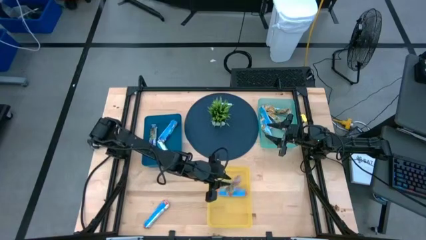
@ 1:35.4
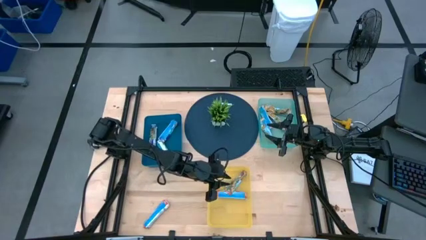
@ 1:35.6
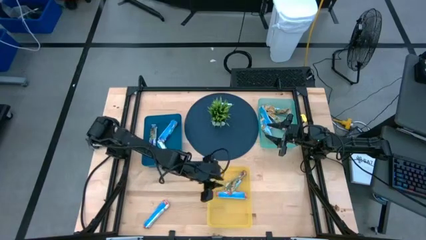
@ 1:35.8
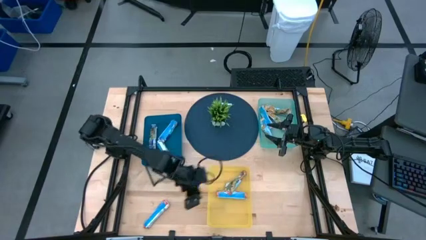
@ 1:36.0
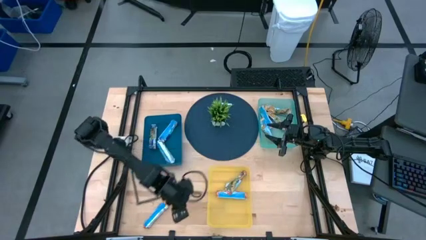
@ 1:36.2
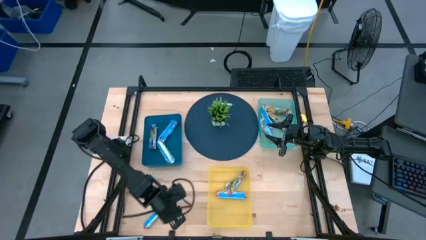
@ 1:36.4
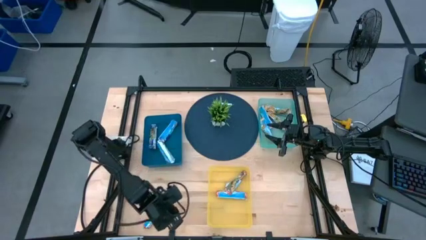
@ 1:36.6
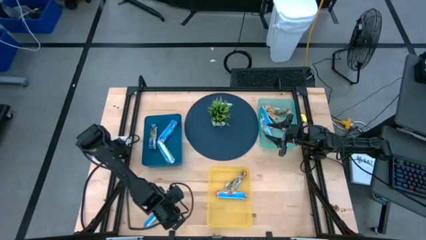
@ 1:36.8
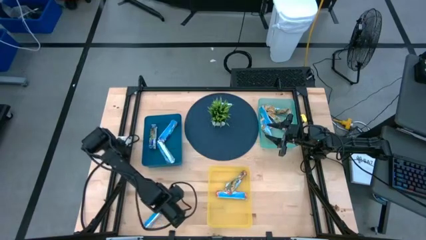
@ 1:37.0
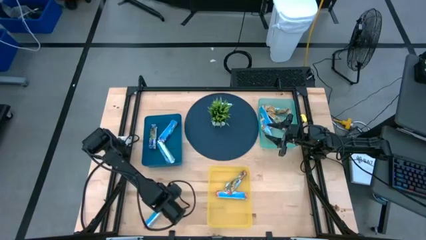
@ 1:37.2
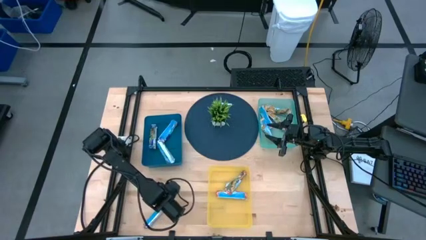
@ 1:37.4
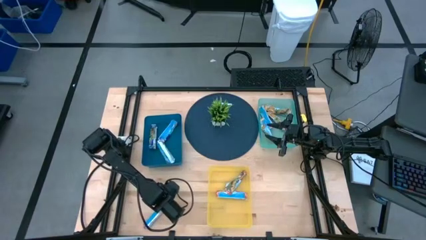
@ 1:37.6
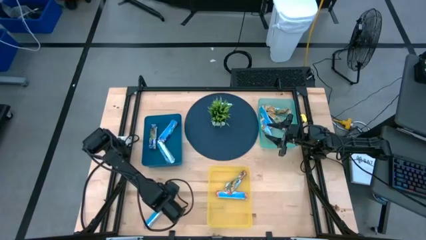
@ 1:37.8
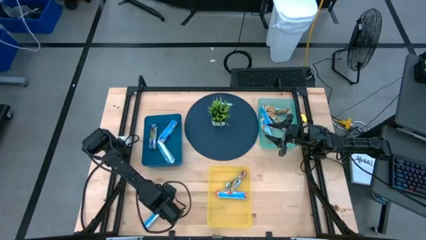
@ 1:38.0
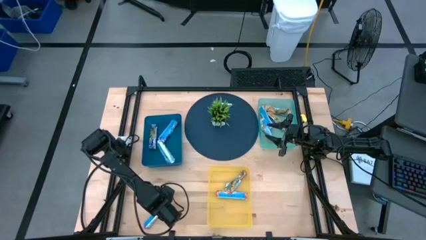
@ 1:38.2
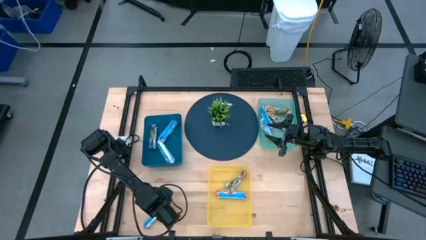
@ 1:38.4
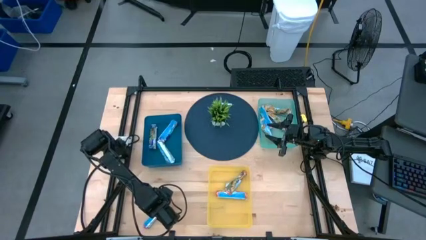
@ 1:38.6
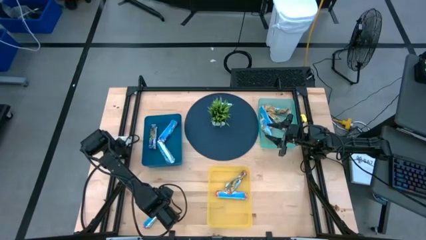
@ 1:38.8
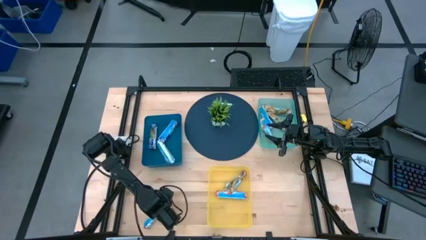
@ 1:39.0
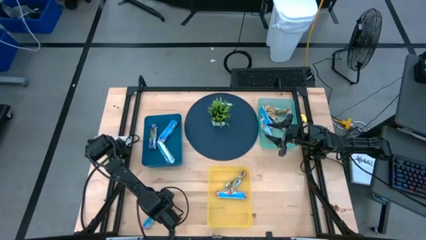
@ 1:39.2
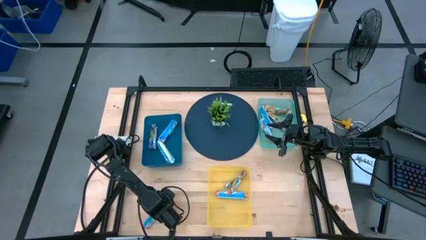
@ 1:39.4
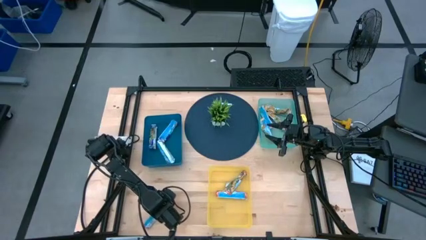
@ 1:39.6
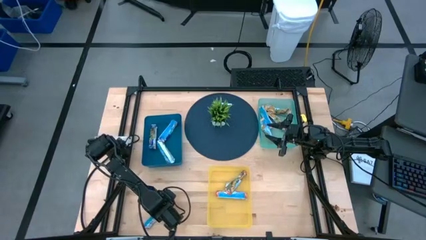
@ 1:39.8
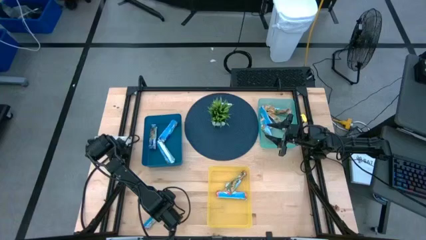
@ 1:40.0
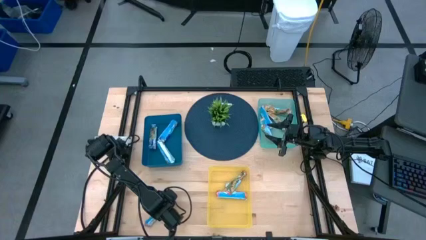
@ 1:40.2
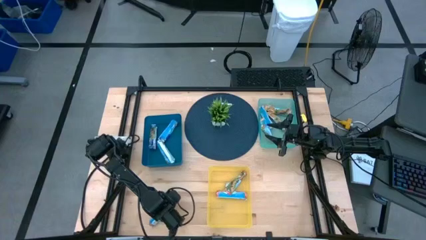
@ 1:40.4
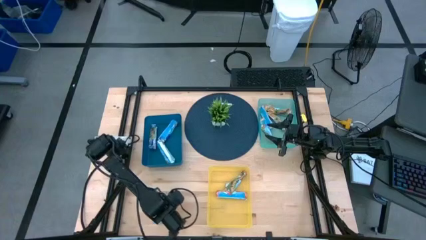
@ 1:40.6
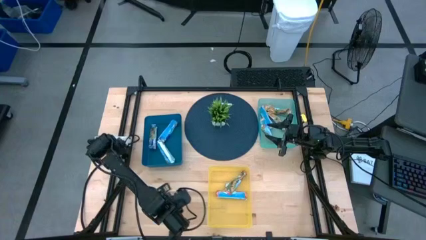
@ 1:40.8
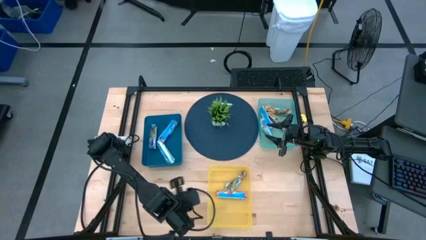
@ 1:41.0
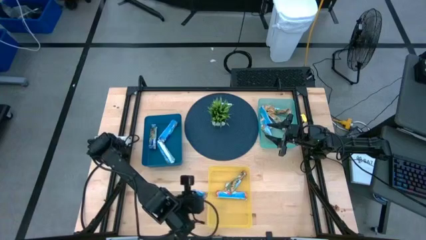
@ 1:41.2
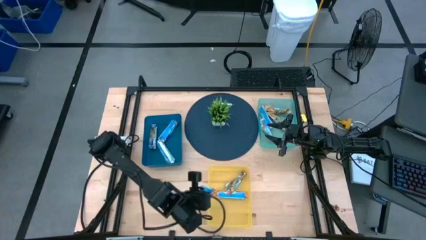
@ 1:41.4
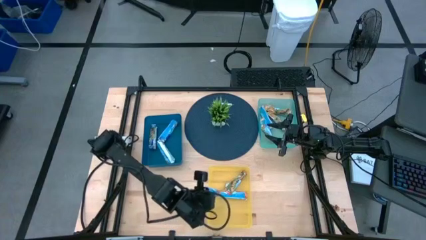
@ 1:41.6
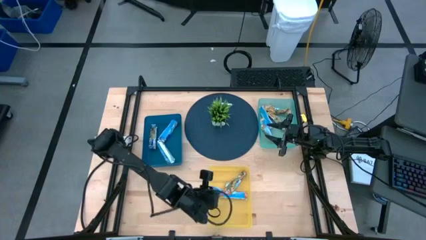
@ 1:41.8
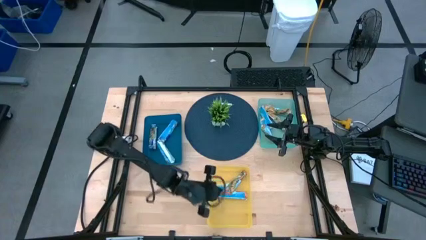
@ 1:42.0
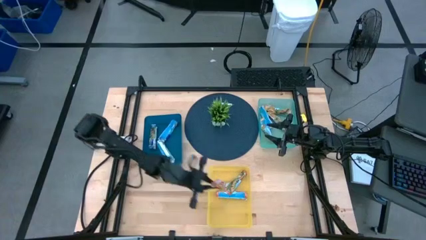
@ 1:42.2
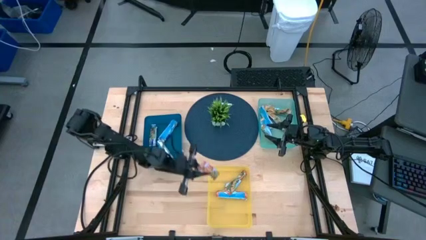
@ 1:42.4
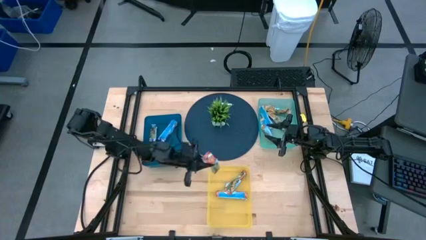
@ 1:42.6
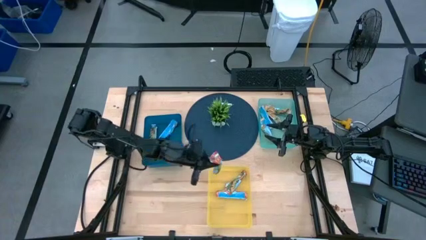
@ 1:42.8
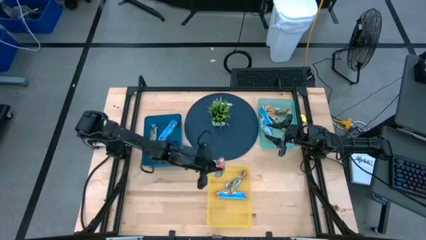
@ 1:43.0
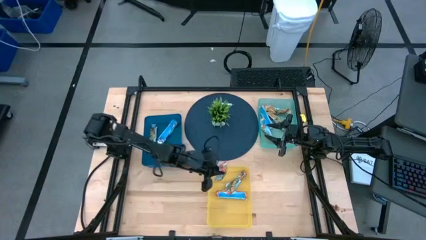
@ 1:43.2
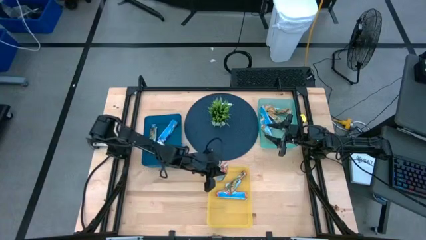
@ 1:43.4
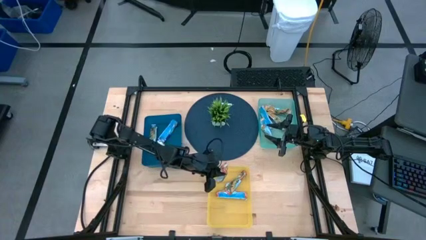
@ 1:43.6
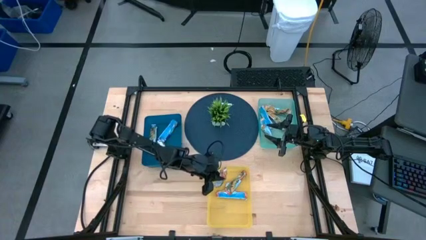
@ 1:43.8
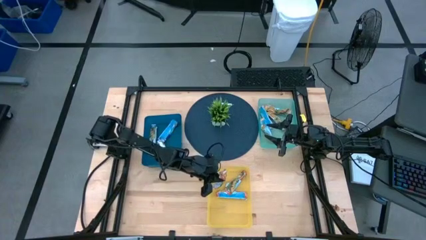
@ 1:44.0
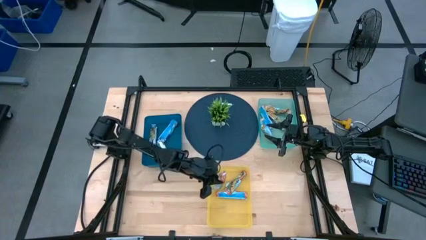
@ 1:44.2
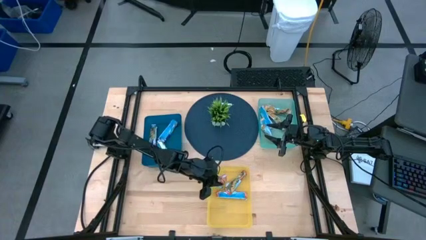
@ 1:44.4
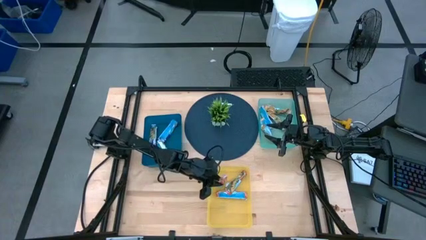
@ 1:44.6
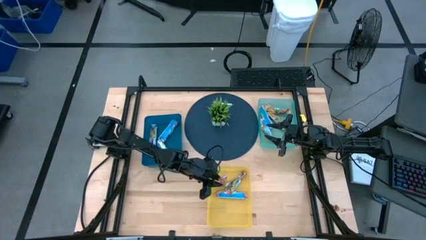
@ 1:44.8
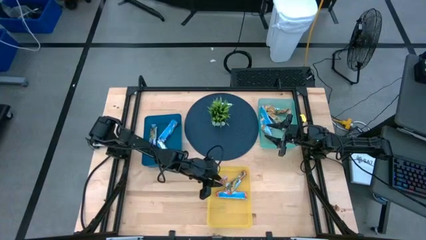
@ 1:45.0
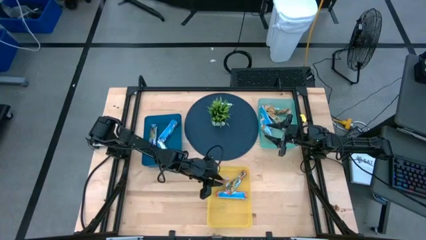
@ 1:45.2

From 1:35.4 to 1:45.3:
Task: Pick and place Granola Bars by type
Put the red granola bar into the yellow bin
